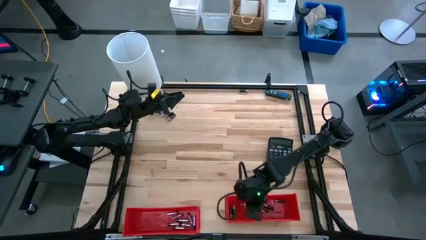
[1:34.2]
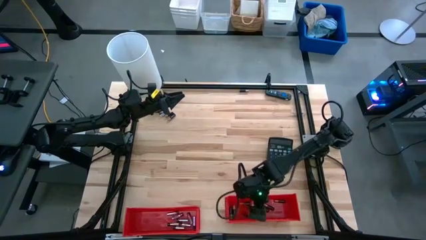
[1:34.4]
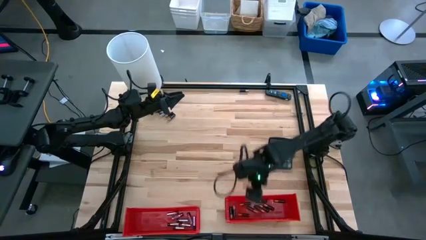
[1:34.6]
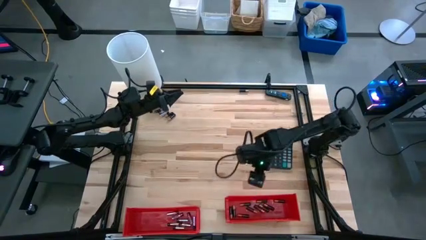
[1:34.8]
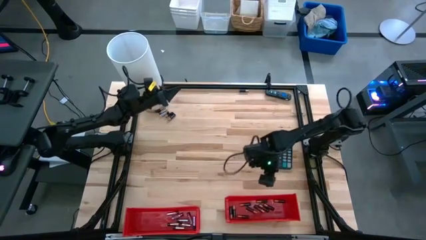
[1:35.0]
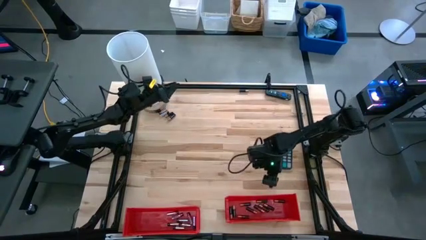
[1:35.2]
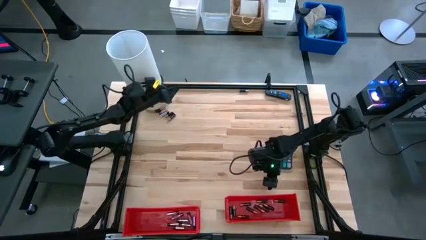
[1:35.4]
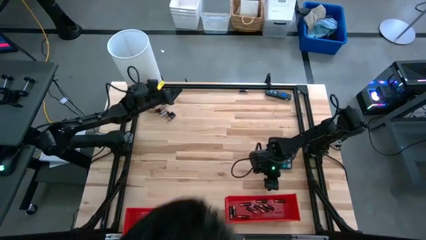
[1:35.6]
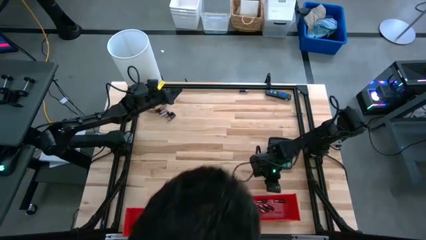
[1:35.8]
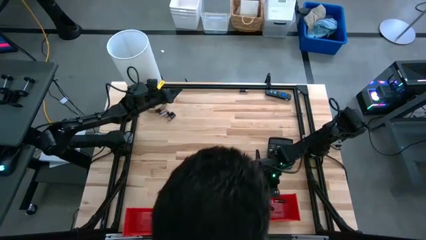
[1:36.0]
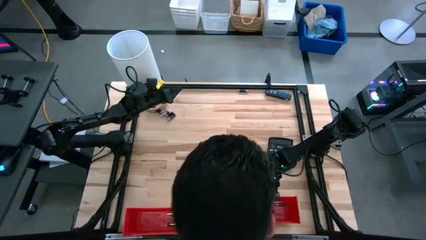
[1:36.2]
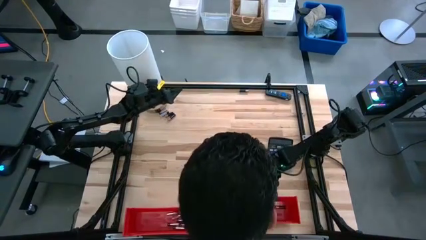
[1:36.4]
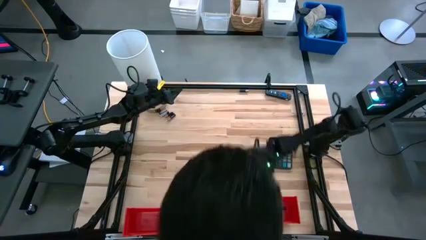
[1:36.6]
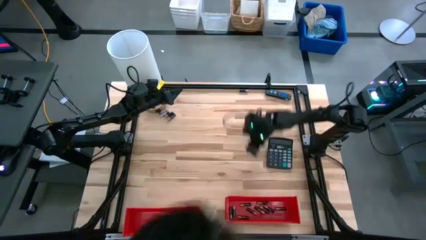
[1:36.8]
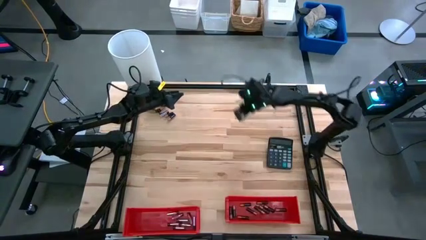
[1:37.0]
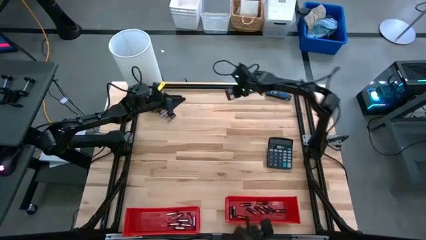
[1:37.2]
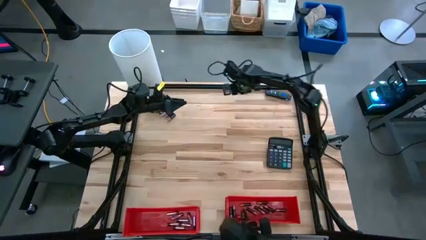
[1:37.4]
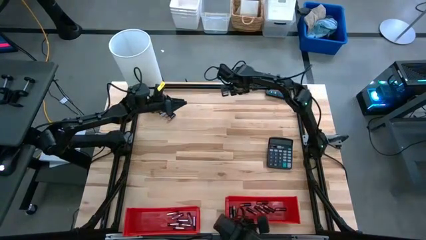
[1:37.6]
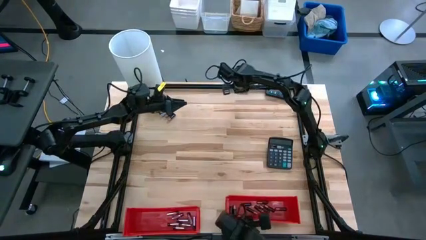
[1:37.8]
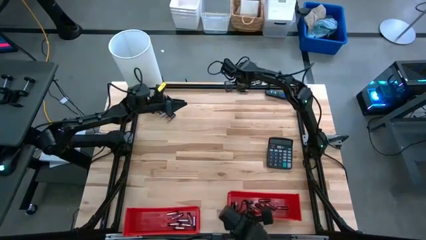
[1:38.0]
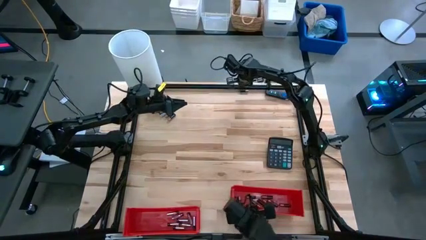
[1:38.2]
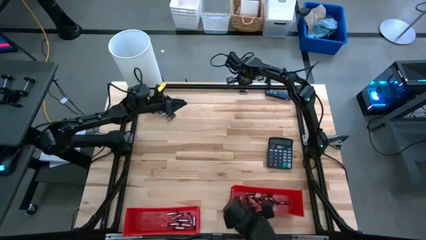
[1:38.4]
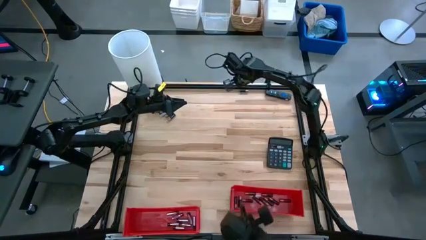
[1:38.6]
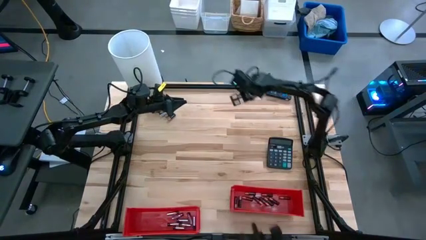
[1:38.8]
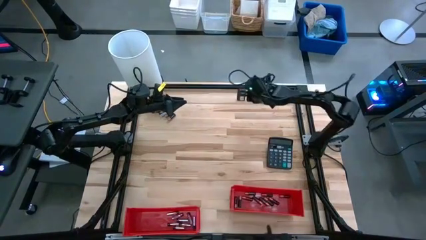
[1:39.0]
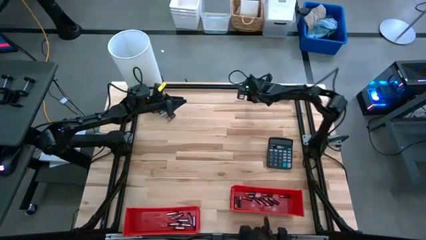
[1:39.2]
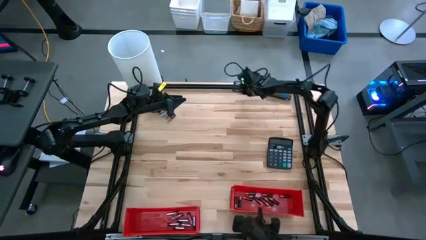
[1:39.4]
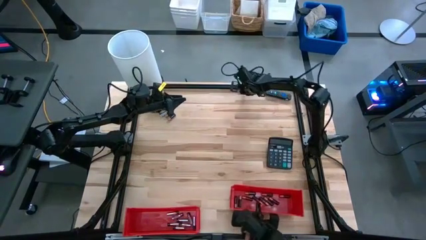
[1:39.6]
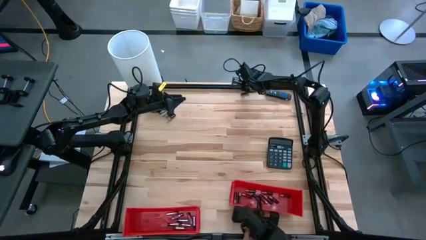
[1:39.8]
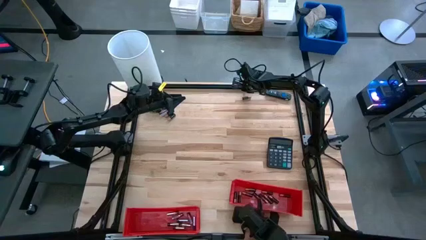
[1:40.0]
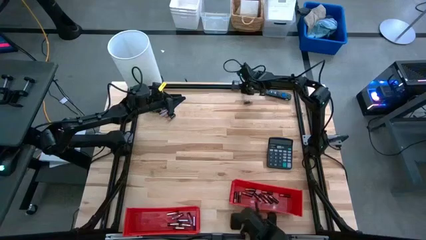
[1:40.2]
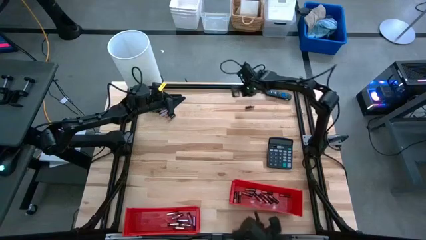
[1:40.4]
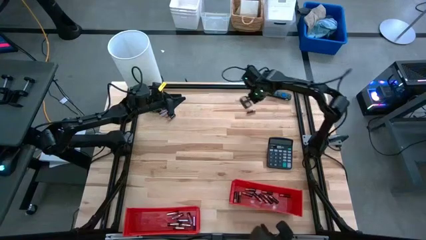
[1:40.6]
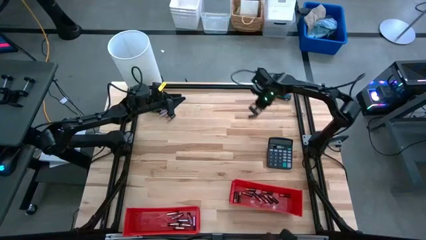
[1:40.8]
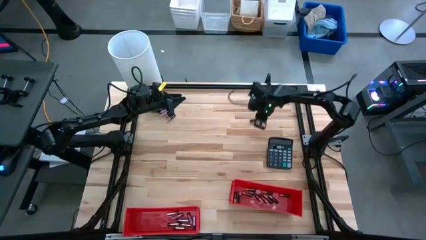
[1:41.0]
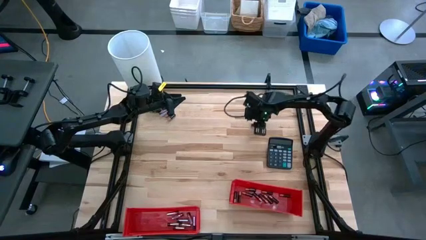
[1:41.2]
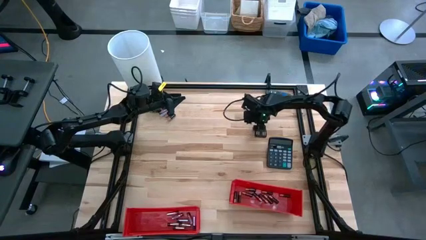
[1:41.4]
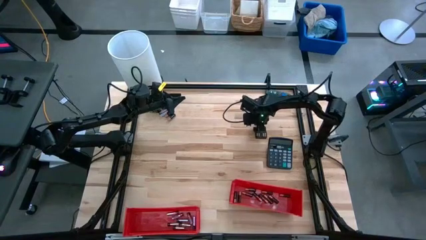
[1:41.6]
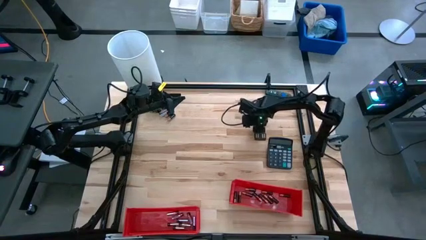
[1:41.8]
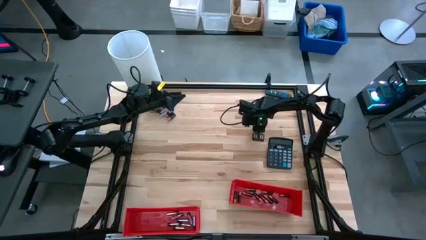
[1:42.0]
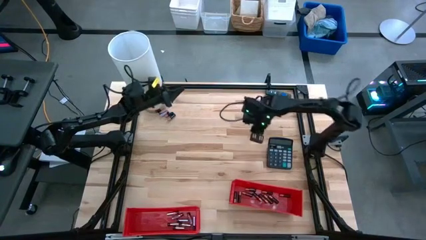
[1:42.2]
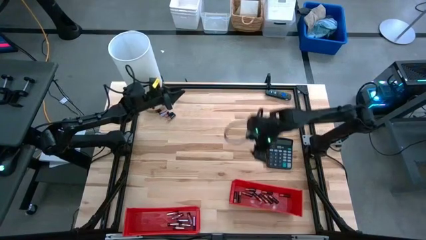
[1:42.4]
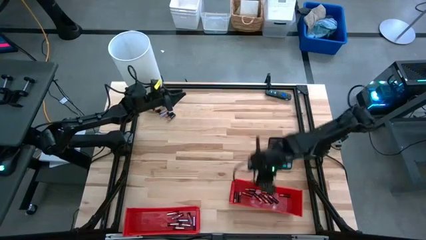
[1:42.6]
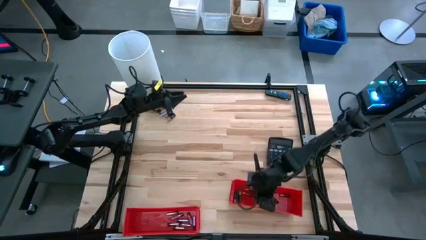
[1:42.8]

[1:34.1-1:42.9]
Task: Sort batteries
Put the black-brown battery into the right red bin

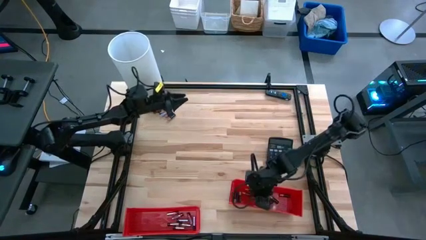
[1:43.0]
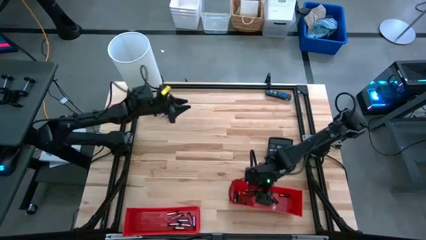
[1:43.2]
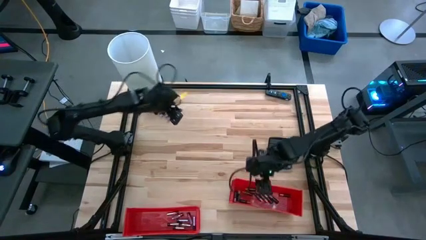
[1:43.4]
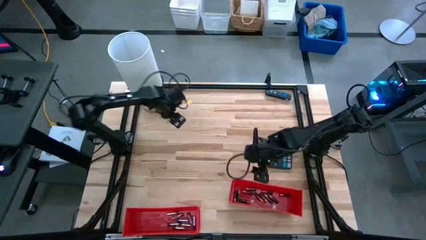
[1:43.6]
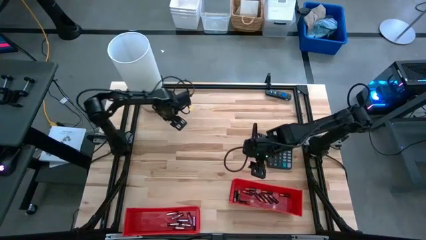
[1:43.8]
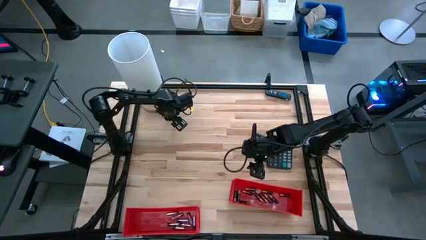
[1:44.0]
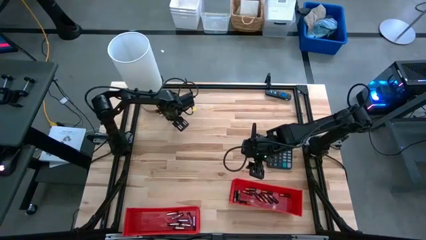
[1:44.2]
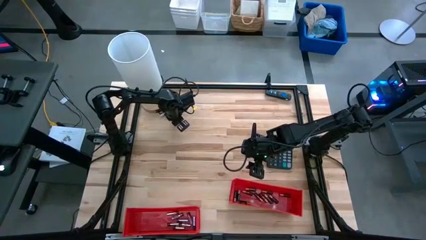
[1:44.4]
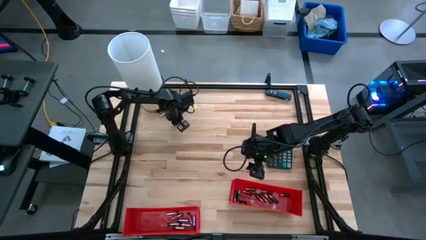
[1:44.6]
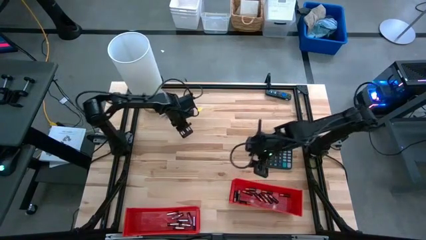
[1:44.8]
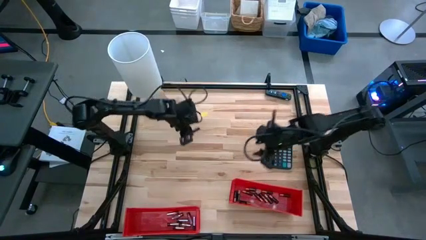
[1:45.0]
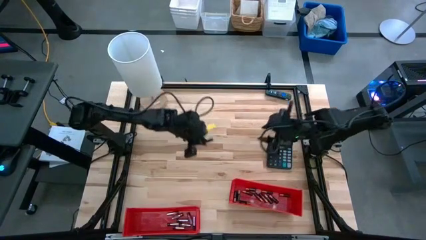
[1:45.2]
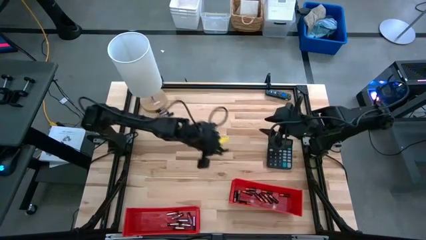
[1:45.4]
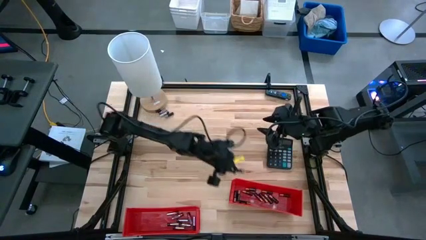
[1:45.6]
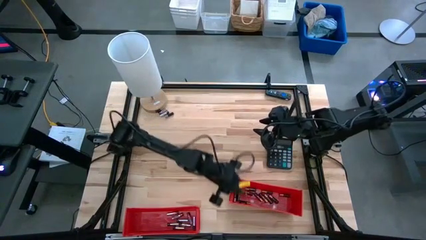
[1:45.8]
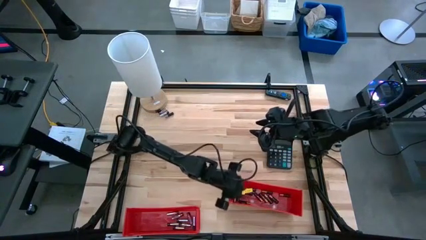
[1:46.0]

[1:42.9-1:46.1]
Put the black-brown battery into the right red bin

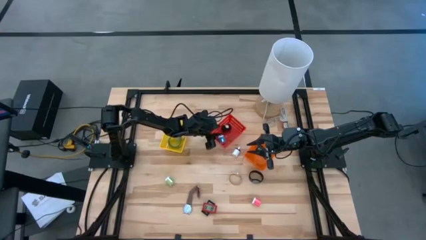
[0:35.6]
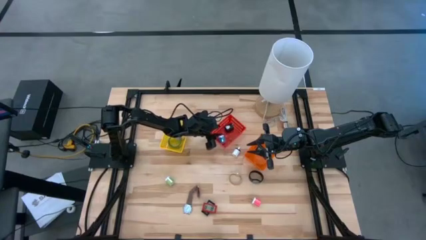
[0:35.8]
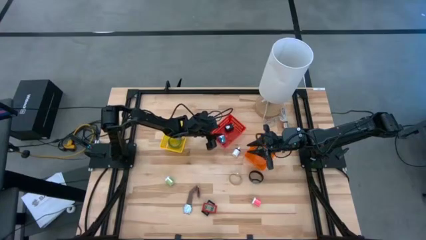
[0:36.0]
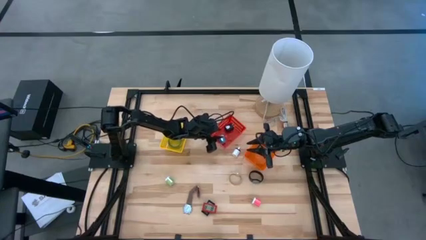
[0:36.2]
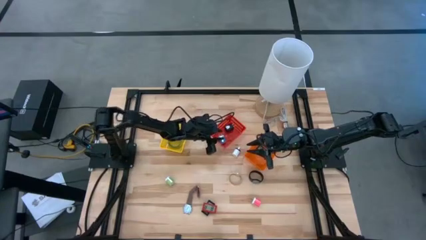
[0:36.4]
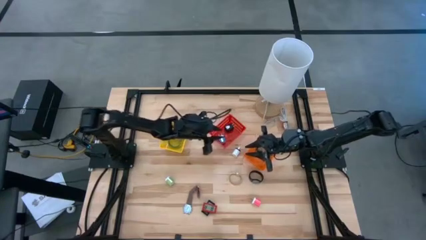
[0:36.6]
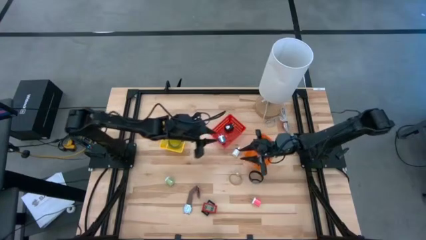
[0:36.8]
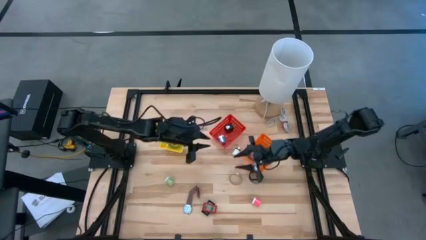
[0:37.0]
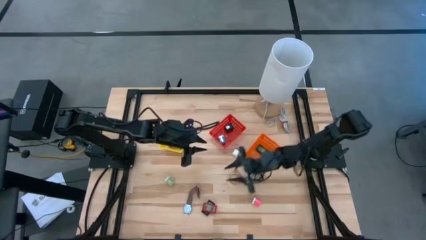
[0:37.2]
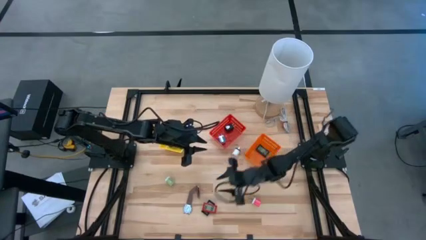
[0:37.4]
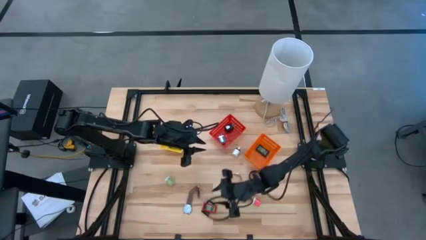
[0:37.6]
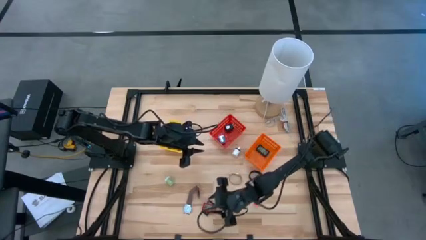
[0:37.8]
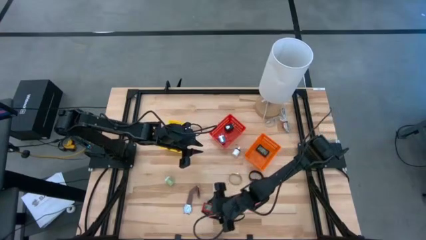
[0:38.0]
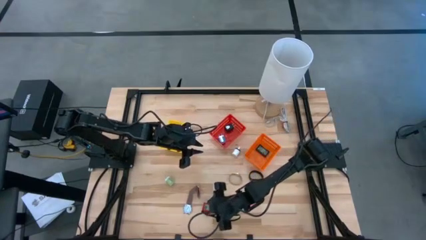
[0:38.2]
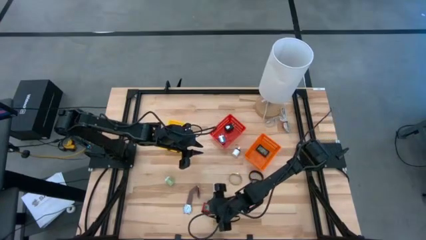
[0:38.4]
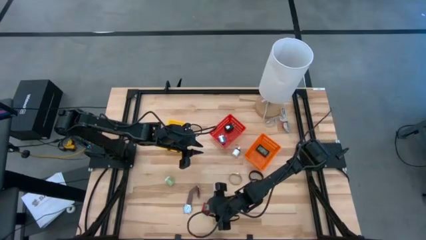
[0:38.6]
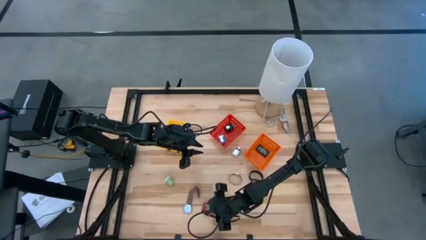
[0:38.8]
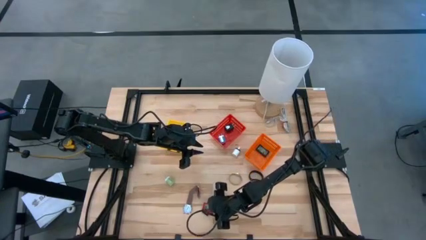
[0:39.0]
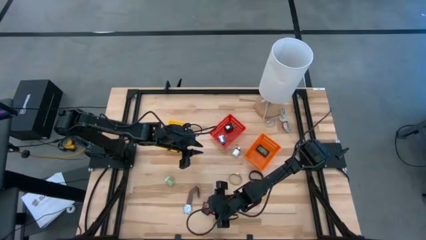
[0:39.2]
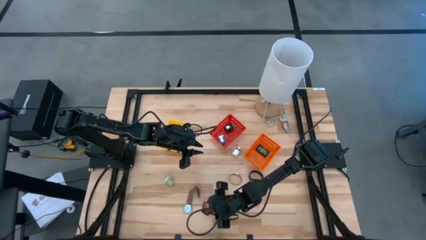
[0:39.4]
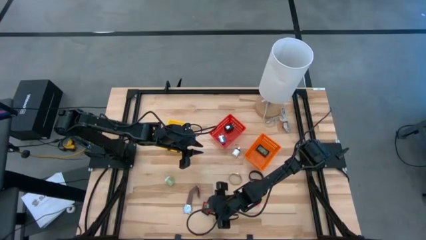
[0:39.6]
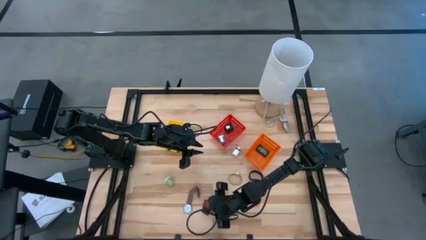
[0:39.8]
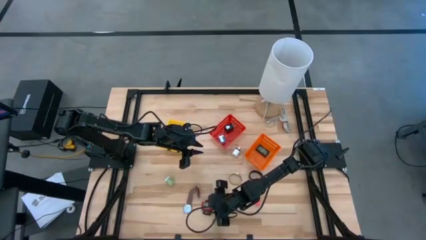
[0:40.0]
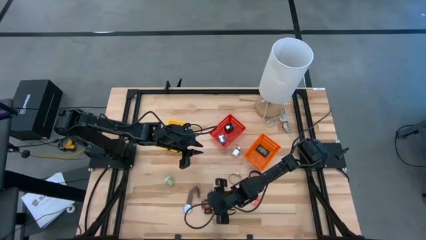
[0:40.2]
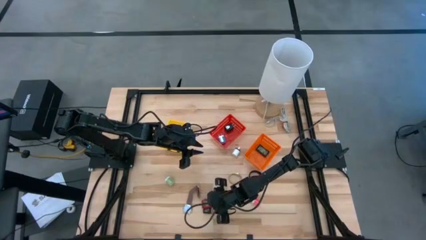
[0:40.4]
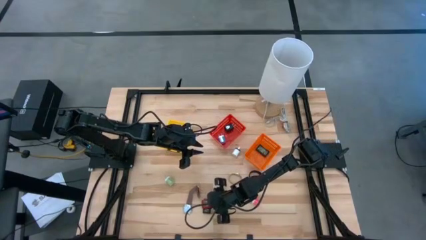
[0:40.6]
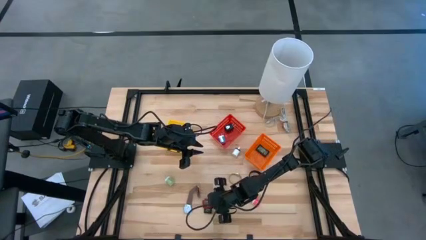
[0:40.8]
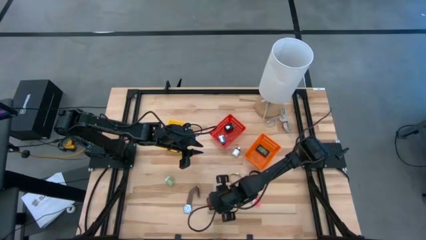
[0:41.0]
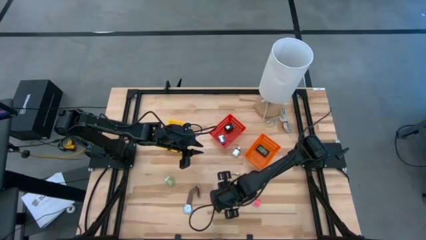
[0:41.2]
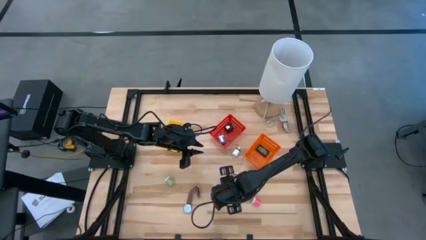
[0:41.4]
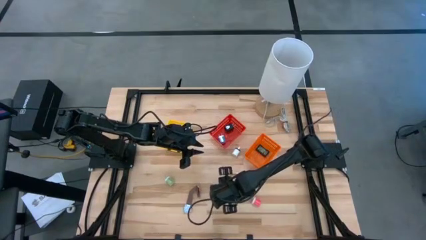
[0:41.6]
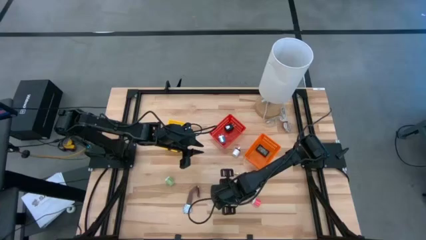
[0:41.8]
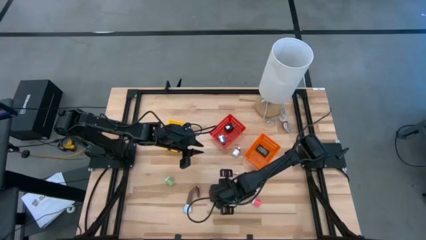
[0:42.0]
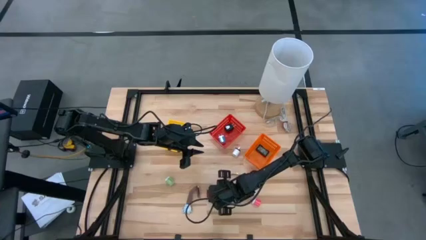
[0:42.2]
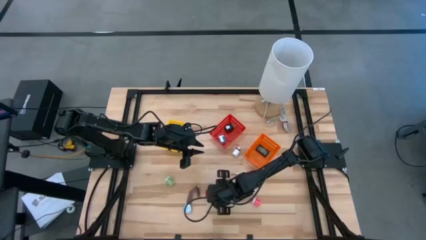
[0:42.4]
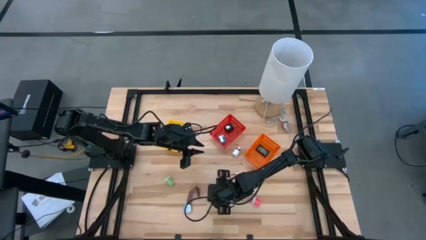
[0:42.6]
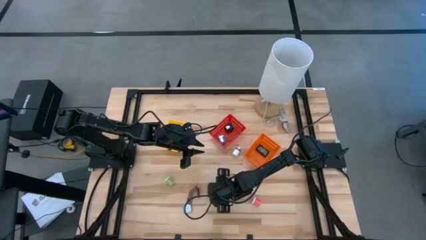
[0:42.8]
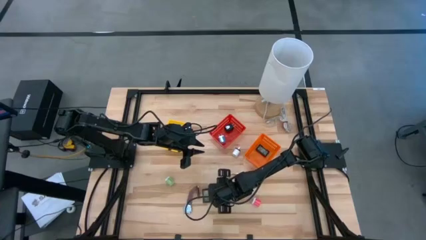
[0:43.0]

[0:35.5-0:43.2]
Task: Pick & Place Office items
Put the red digital clock into the orange bin
